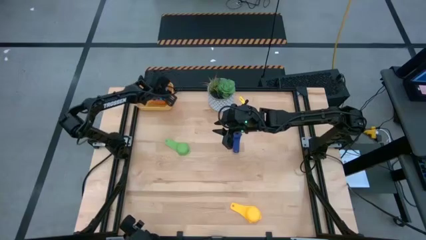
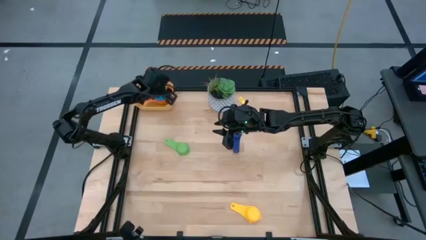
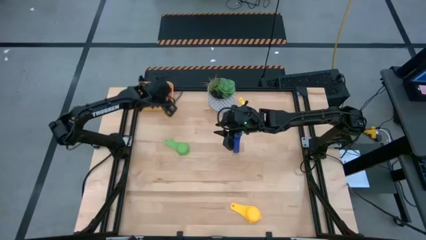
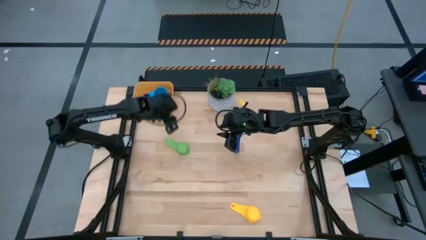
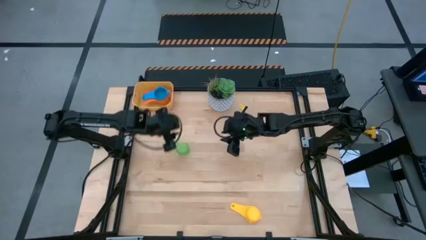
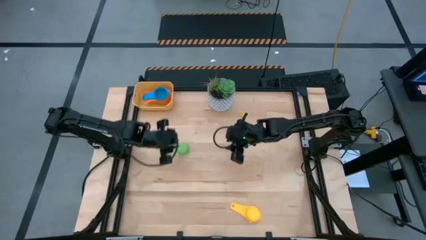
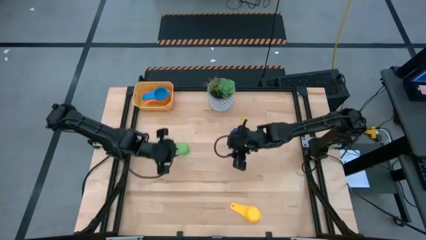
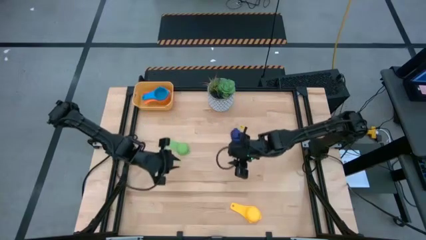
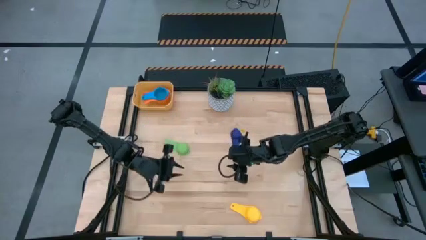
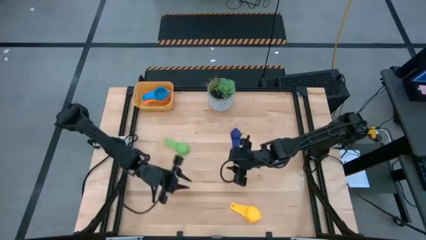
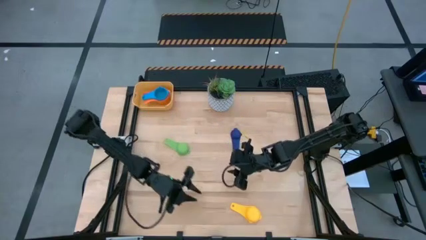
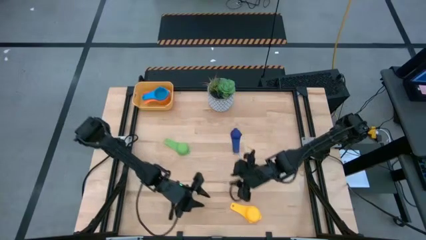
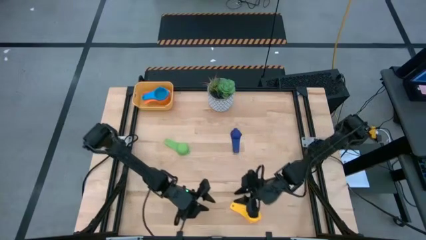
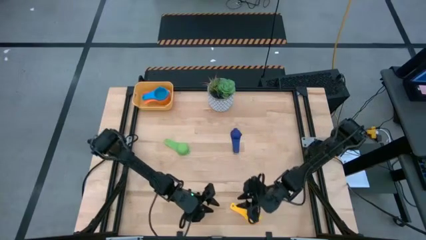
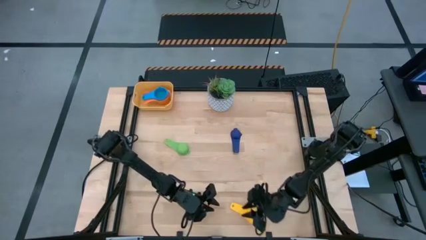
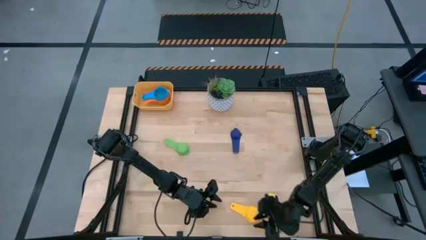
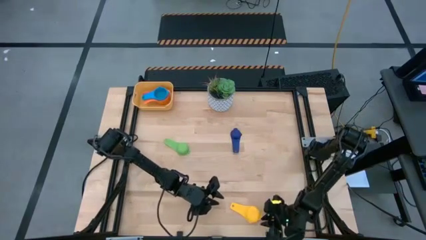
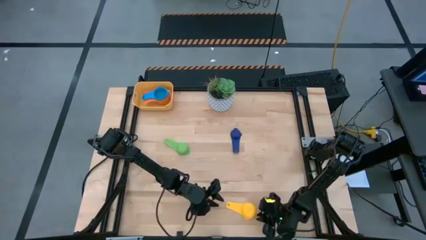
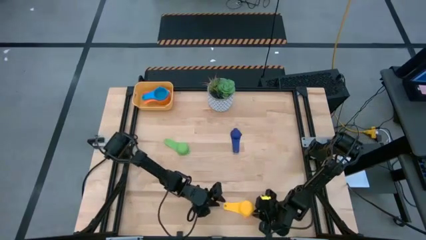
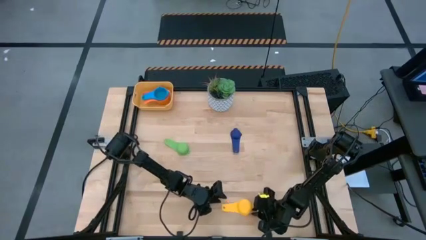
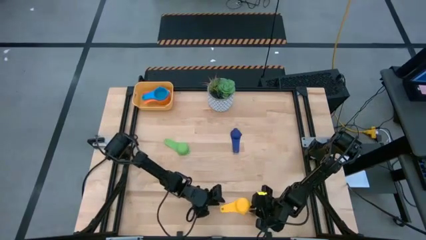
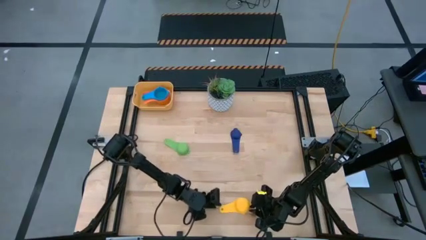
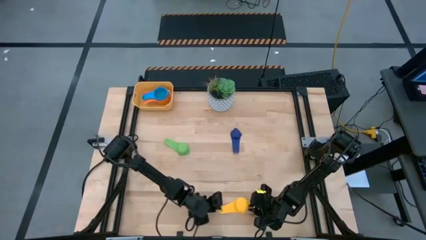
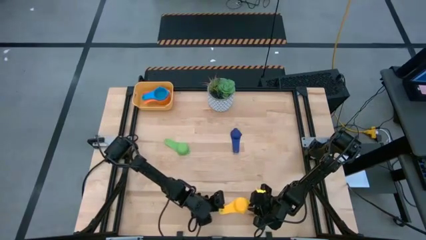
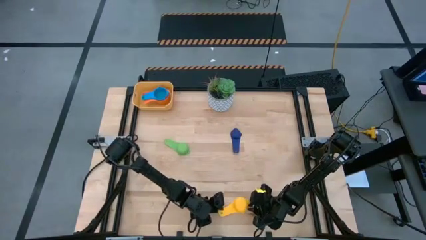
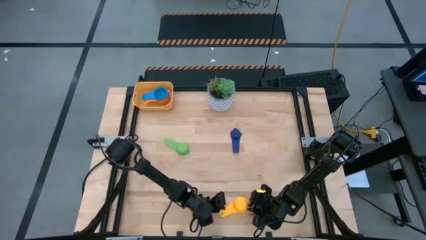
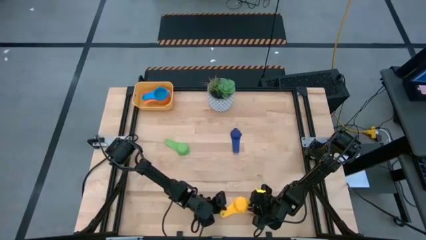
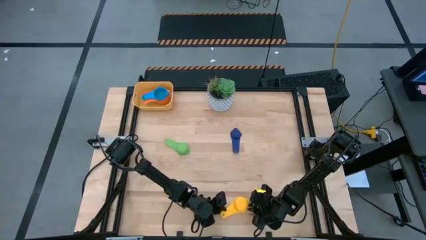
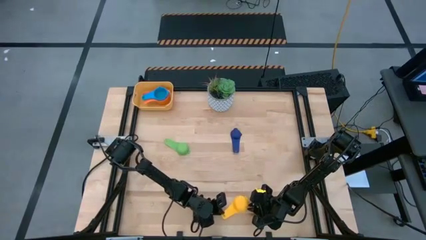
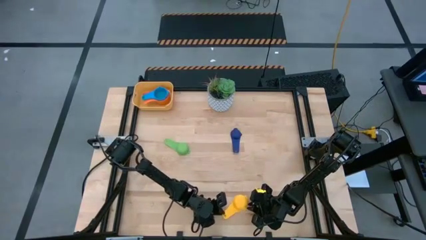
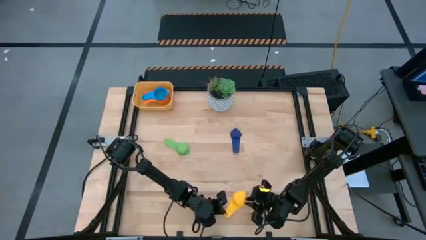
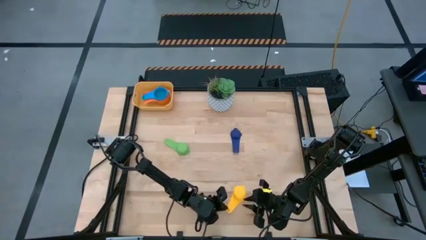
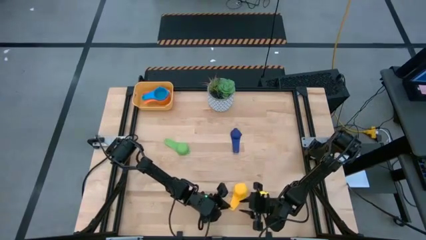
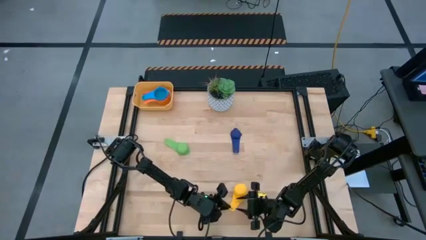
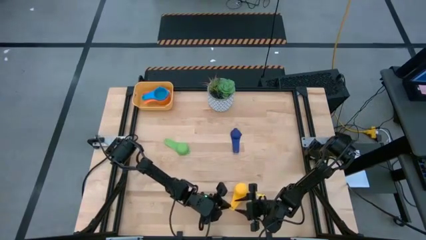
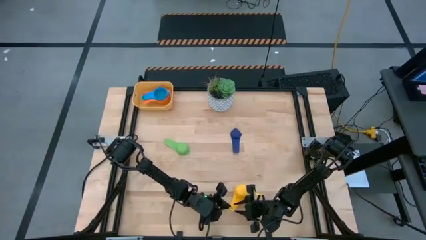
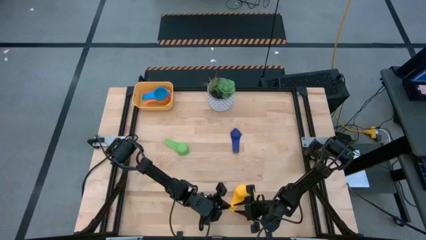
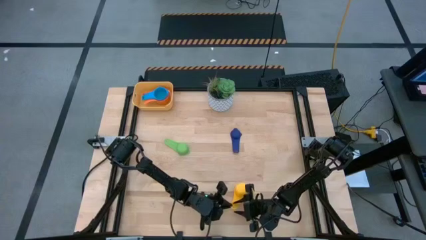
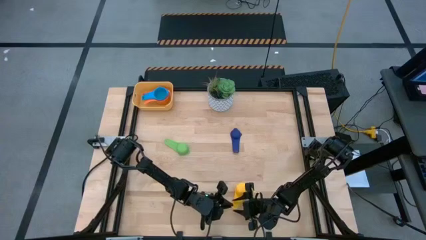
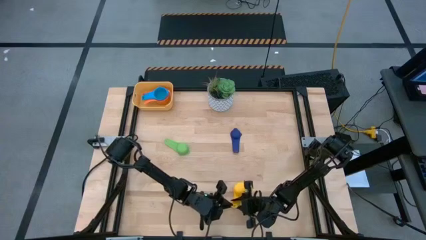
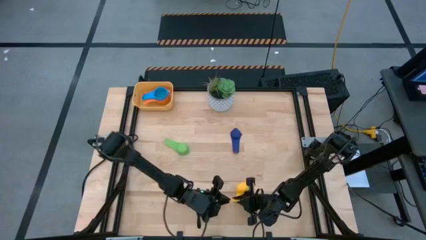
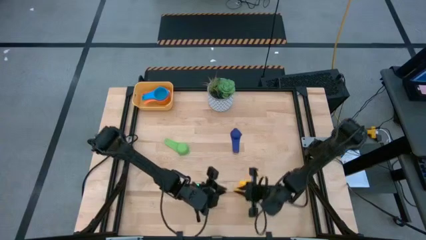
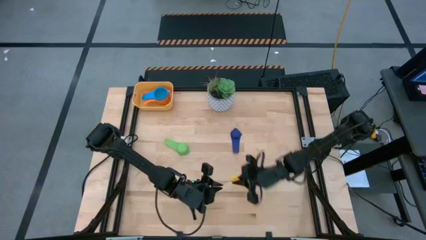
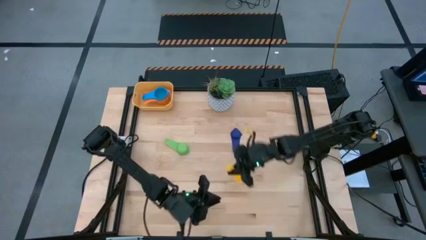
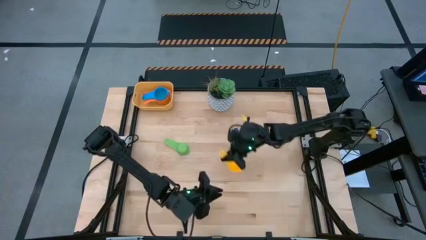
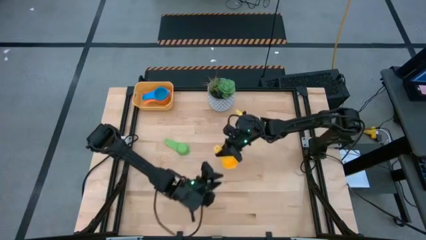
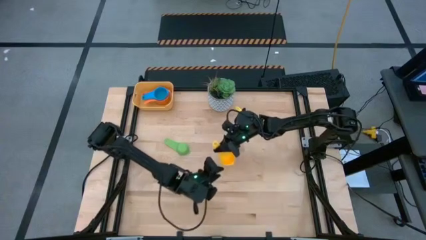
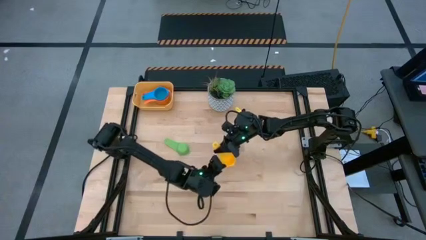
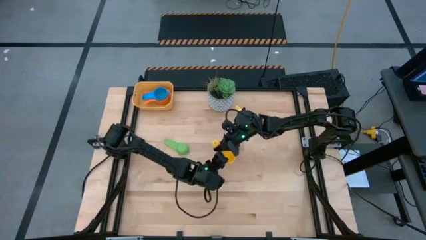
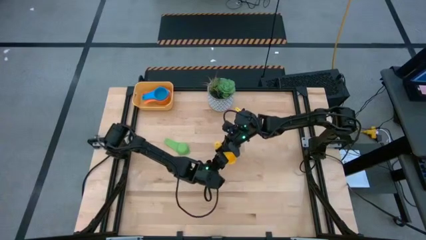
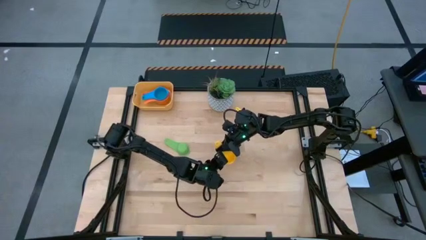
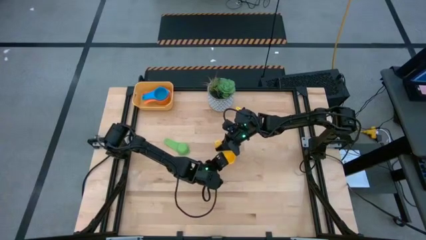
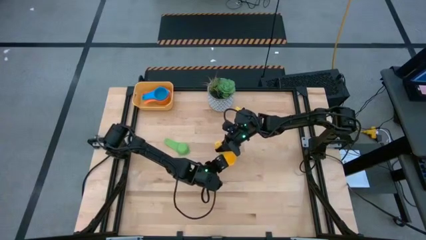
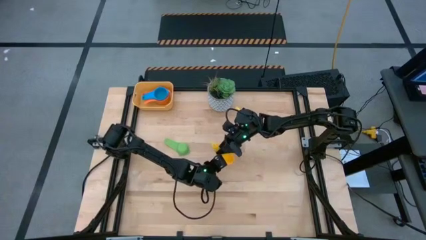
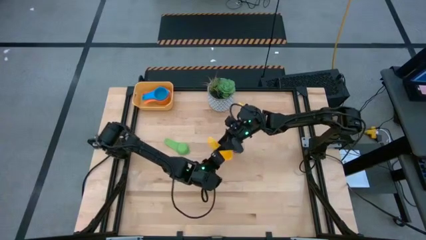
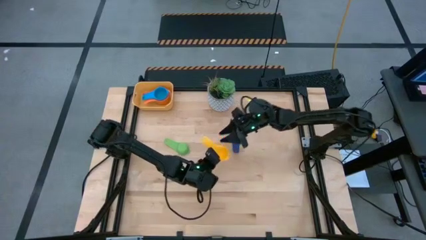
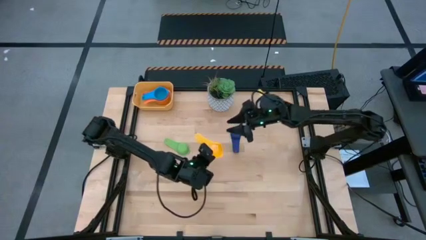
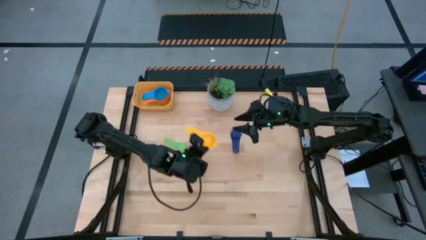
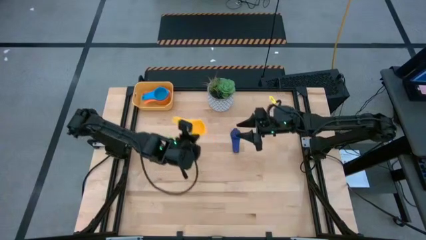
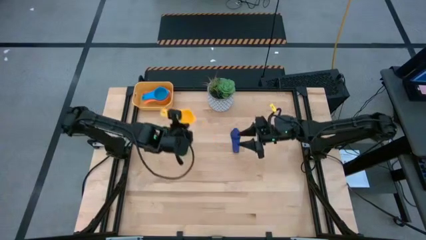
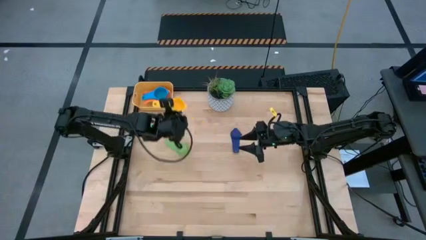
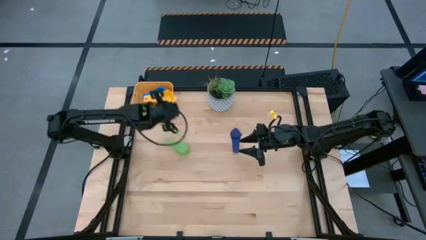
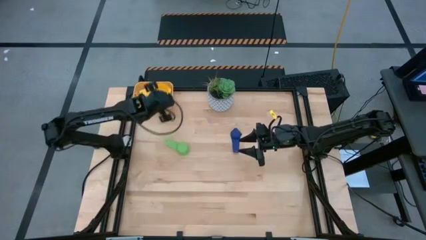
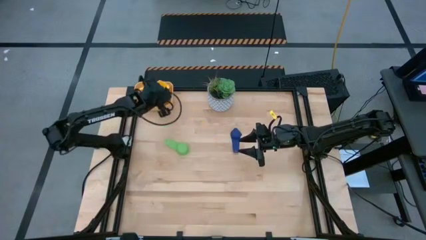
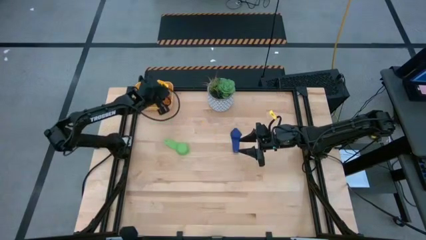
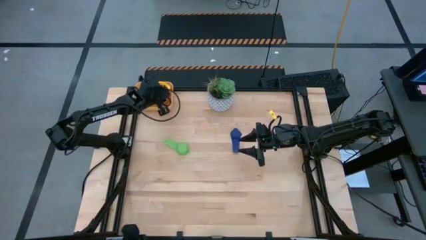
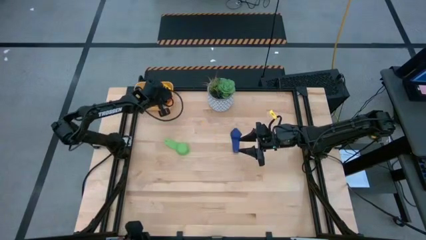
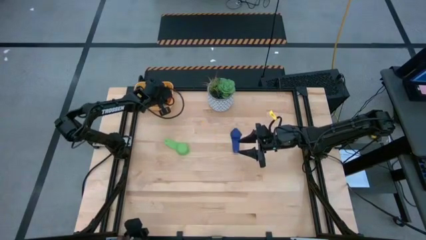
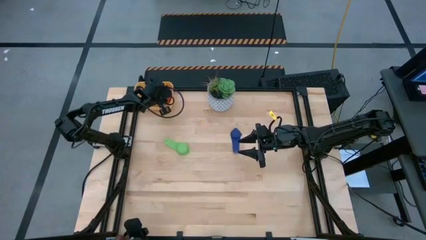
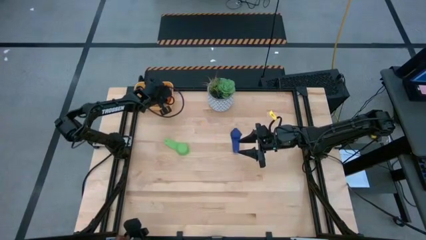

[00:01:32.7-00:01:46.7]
Task: Nest measuring cups in basket
Stack the yellow measuring cup on top of the light blue measuring cup in the yellow bin
